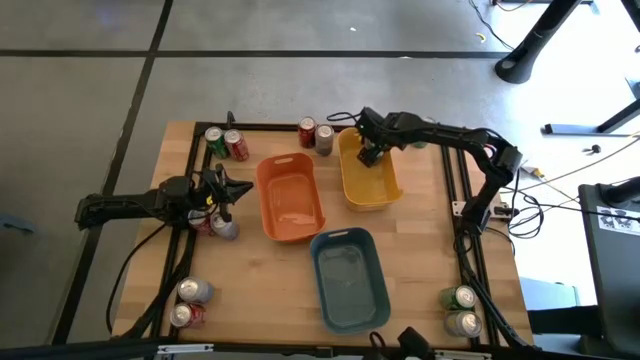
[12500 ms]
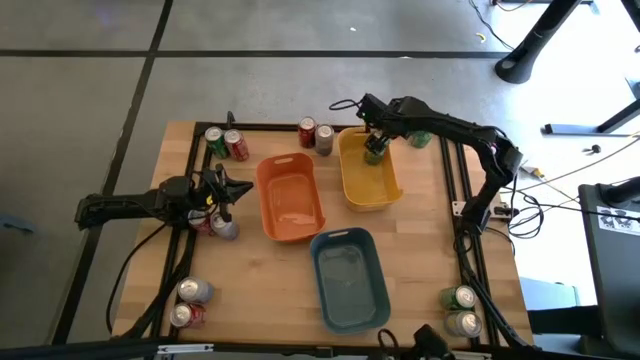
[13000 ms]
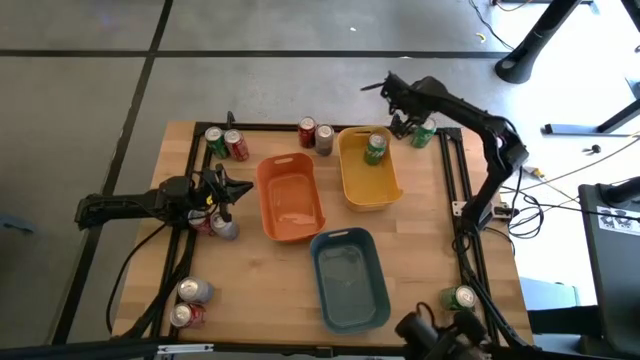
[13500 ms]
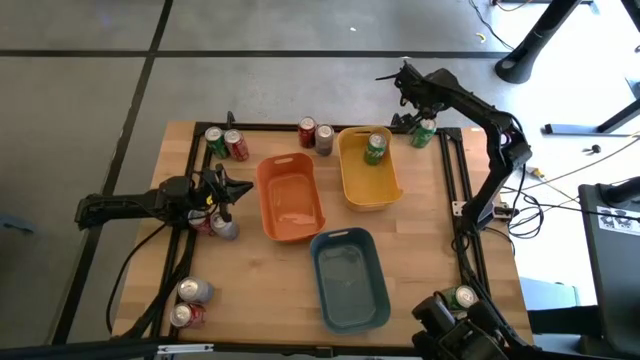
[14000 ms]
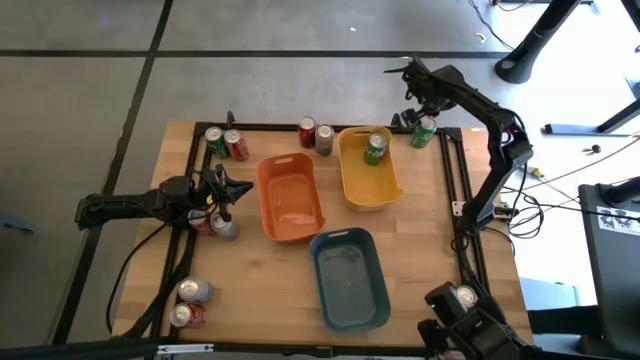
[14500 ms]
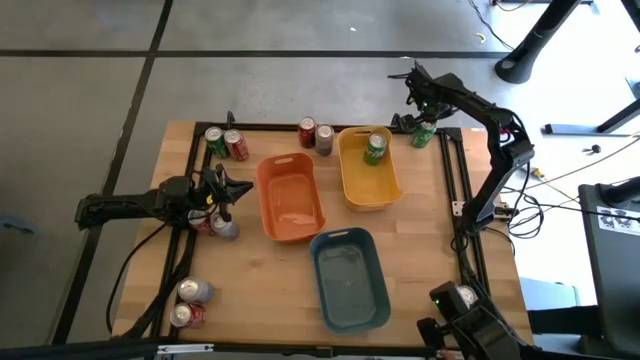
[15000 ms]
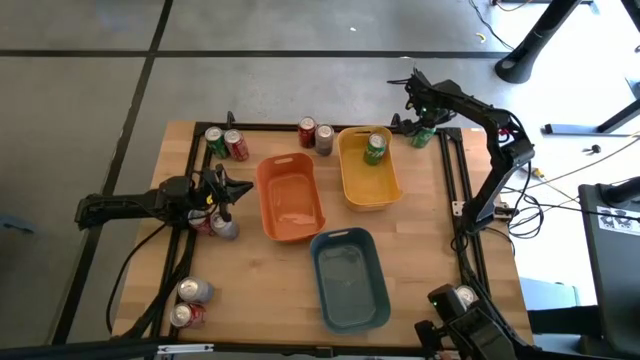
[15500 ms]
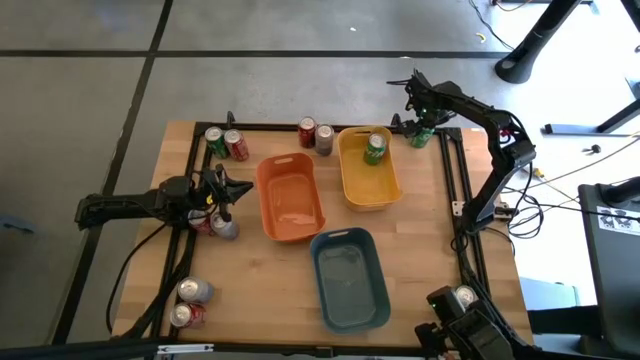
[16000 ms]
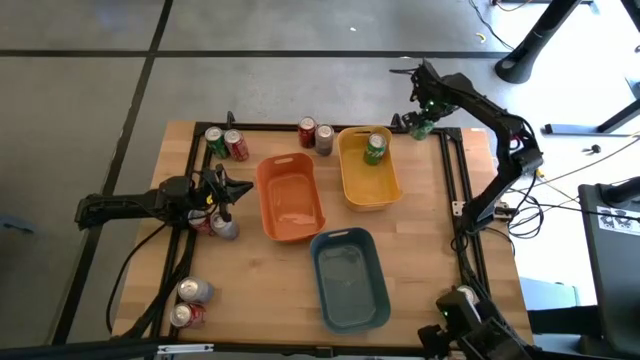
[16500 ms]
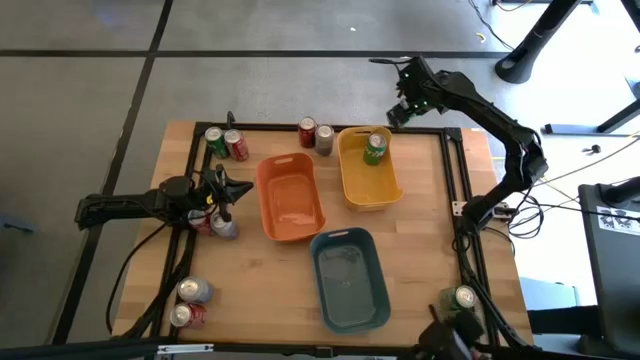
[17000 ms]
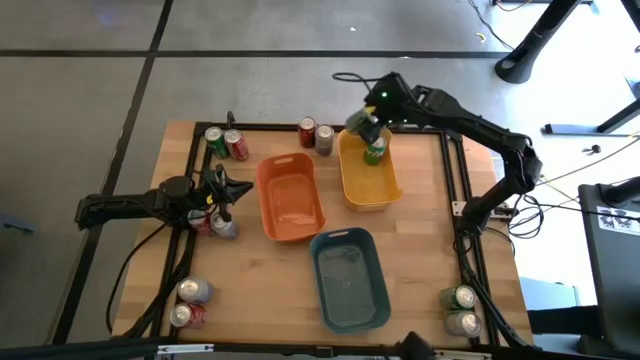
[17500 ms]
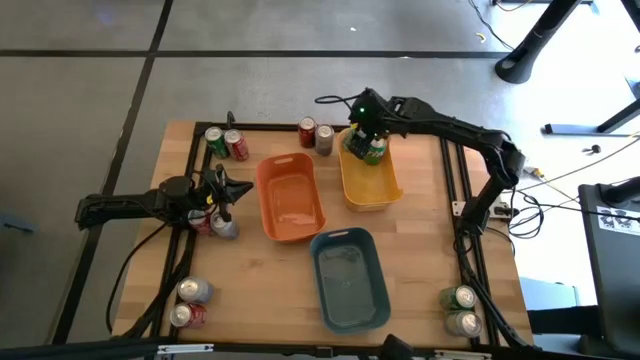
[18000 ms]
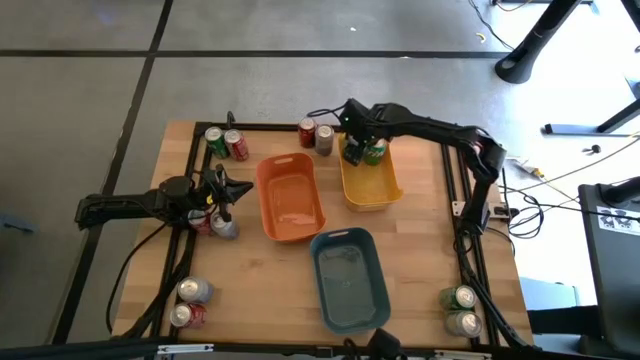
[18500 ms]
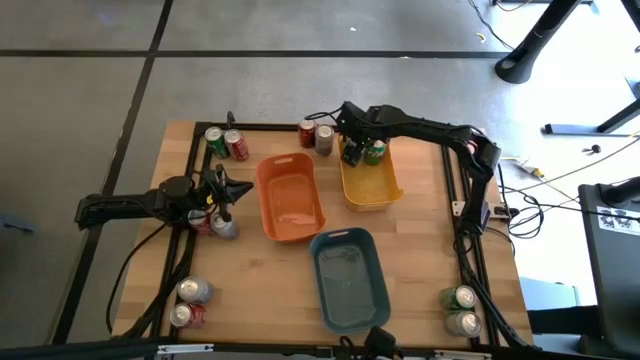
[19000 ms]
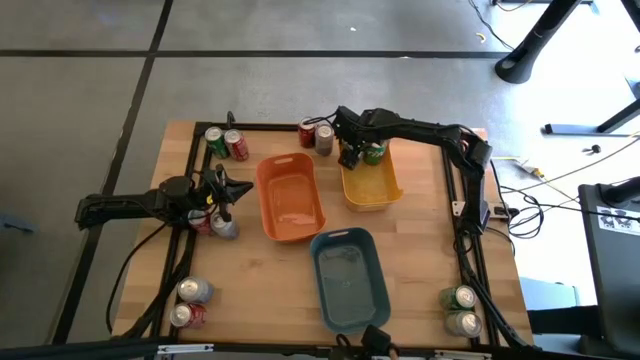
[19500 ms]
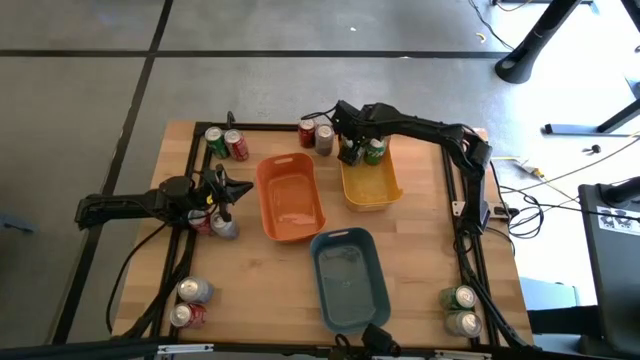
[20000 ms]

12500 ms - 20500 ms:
Task: Sort soda cans
Put the green soda can into the yellow bin

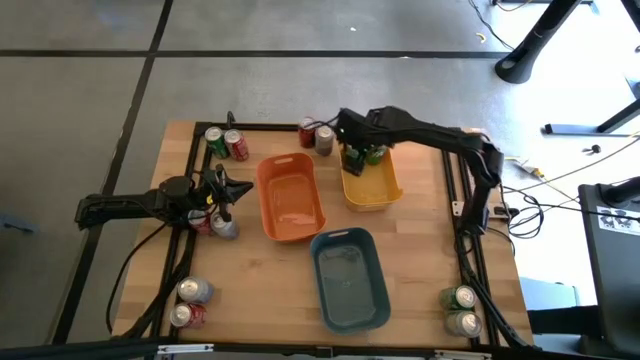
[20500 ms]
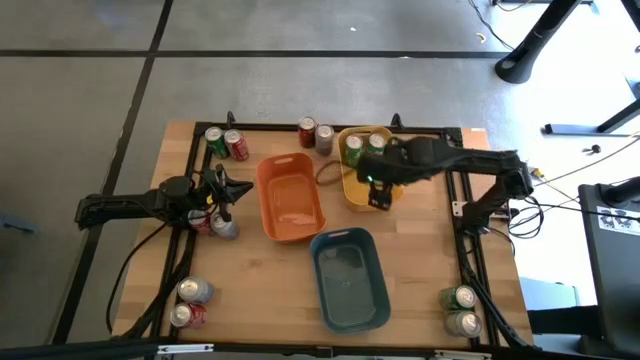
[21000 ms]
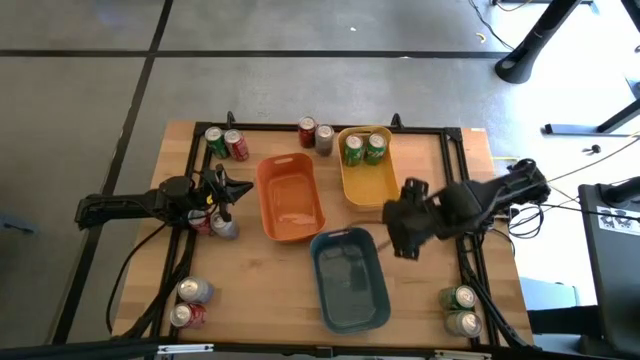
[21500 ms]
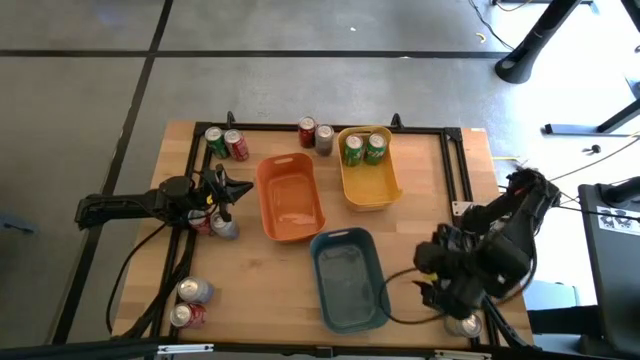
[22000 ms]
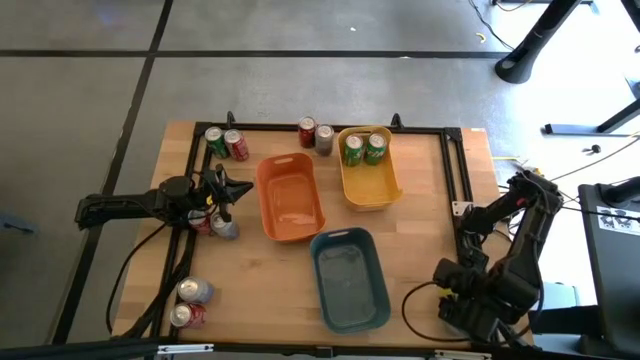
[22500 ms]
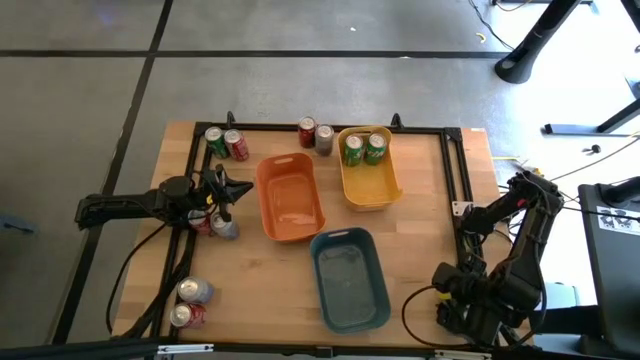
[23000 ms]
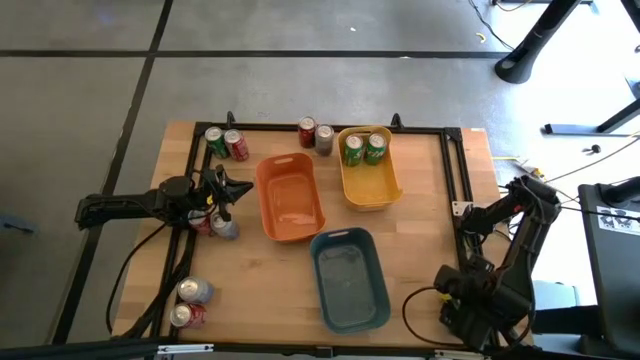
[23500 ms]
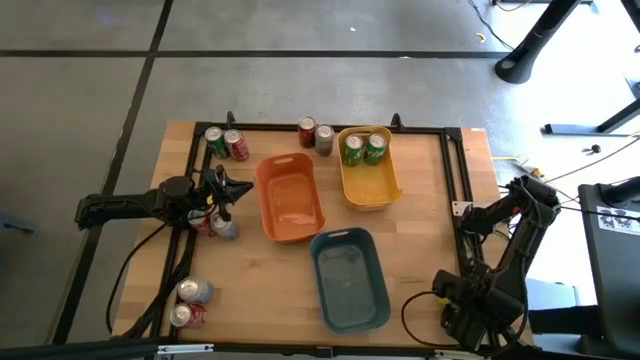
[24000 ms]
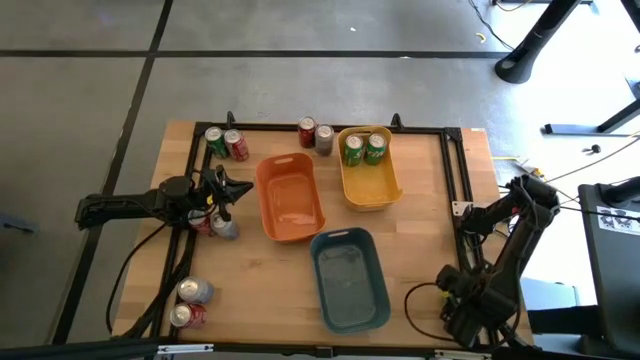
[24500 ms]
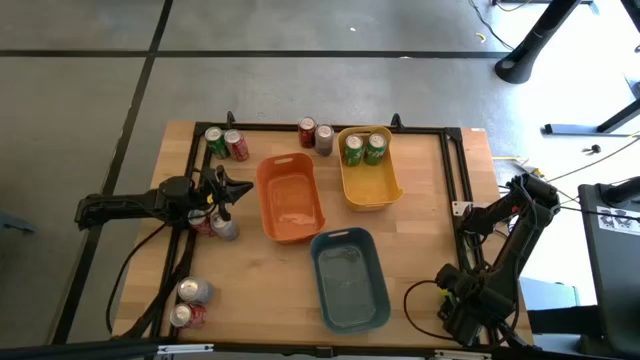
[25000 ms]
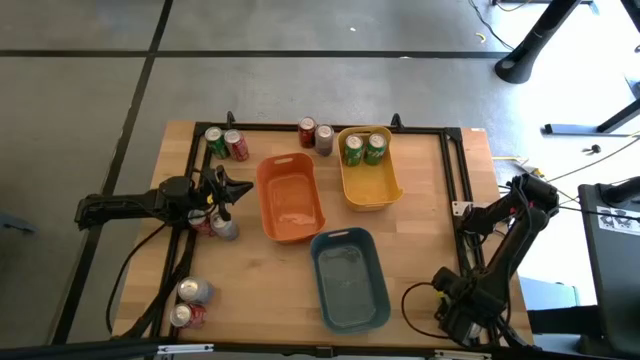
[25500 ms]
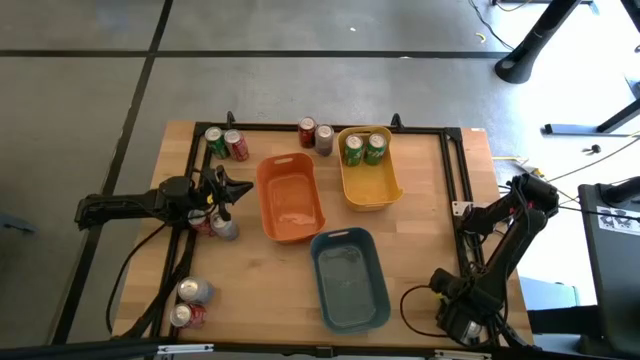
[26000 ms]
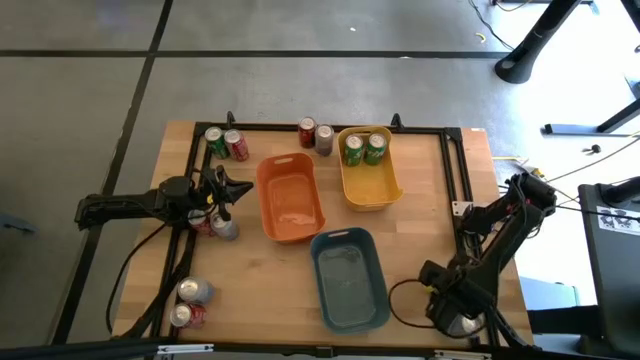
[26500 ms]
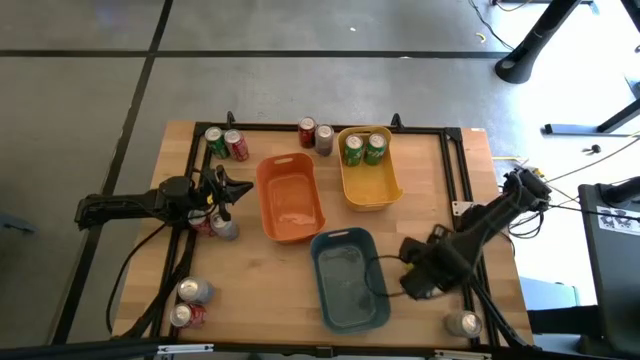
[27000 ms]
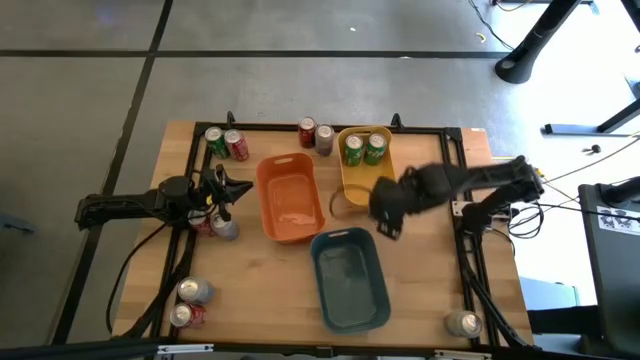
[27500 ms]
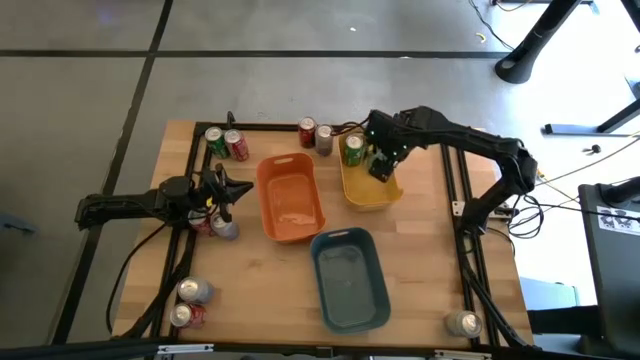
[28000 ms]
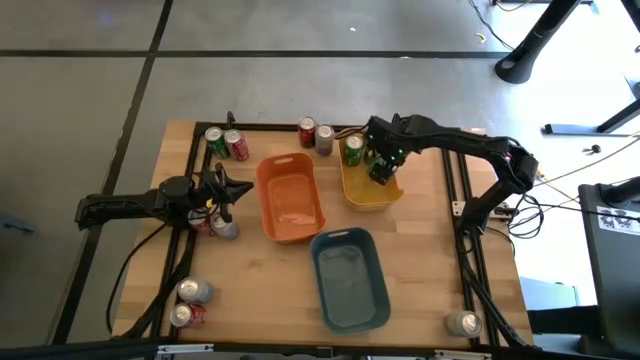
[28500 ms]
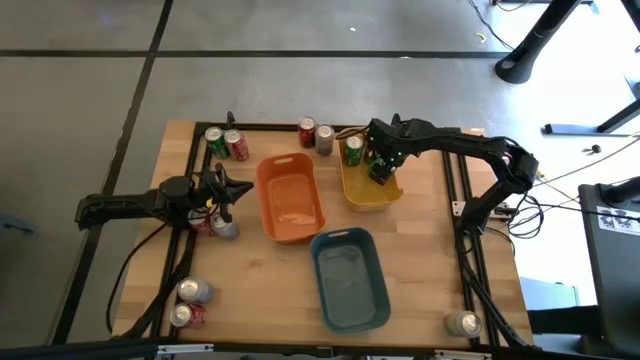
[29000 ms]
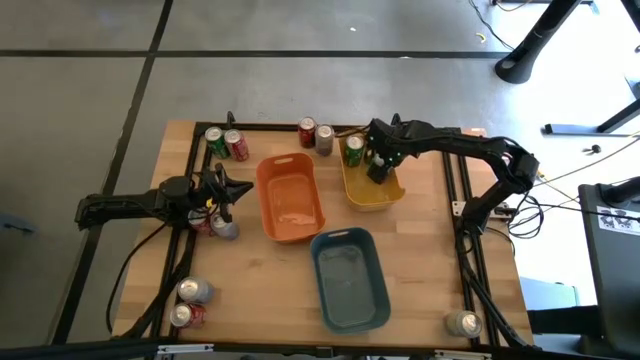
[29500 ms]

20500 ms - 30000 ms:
Put the green soda can into the yellow bin

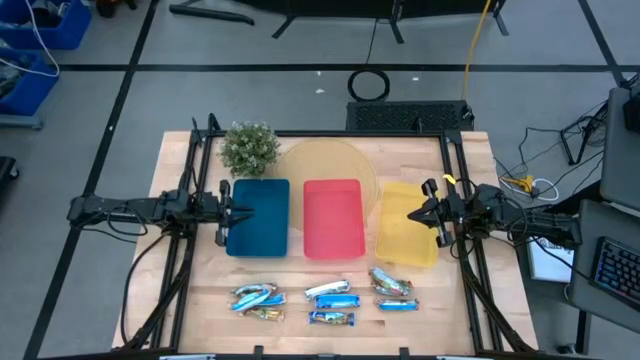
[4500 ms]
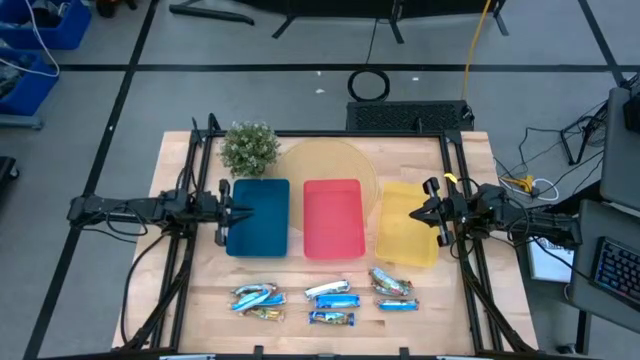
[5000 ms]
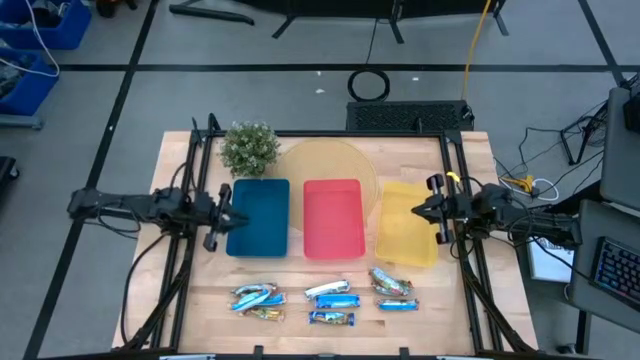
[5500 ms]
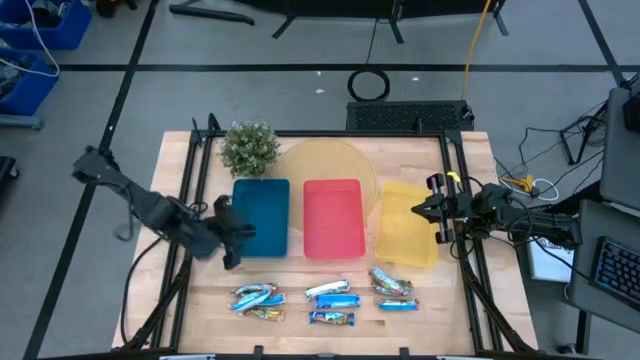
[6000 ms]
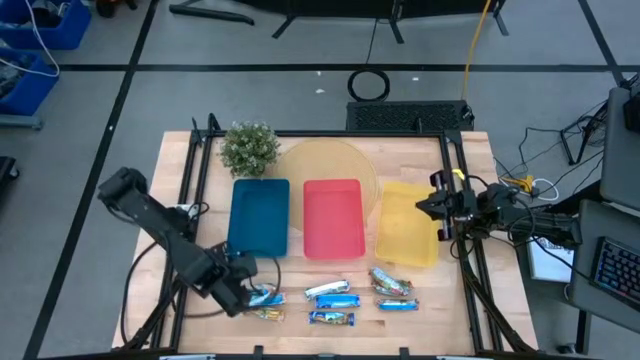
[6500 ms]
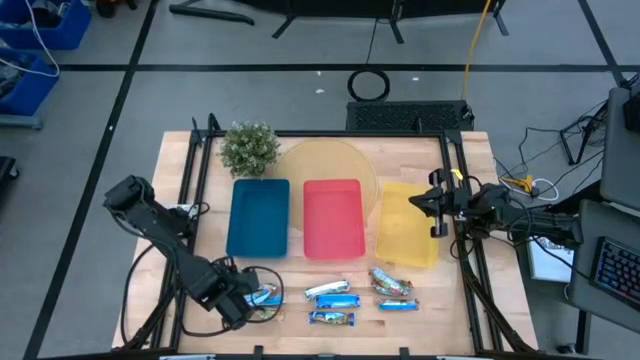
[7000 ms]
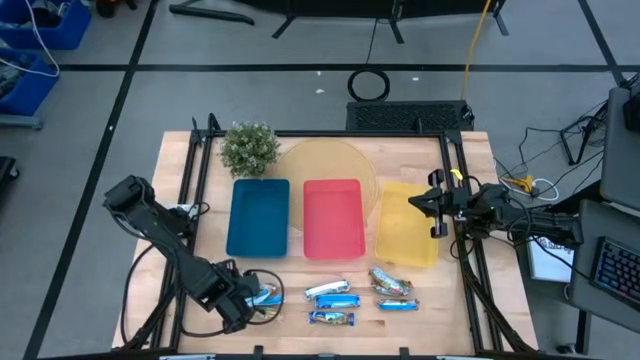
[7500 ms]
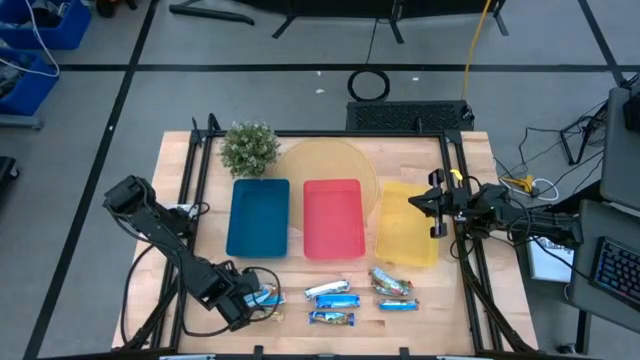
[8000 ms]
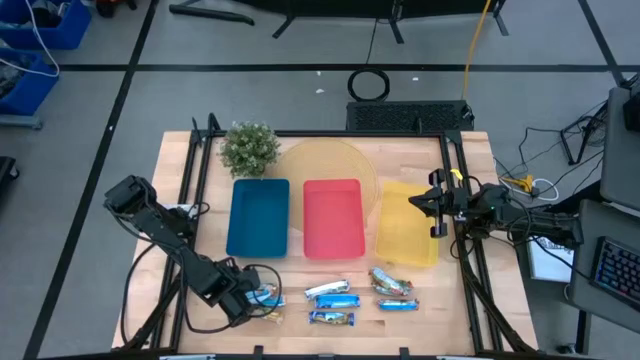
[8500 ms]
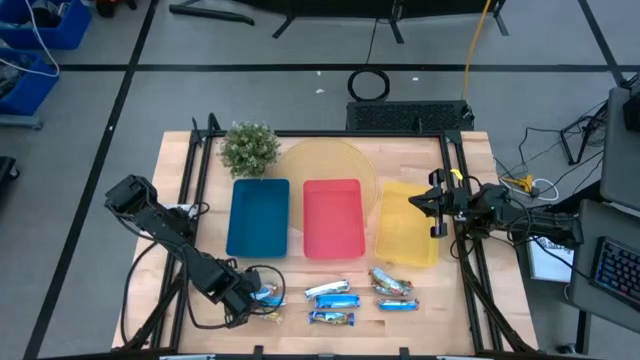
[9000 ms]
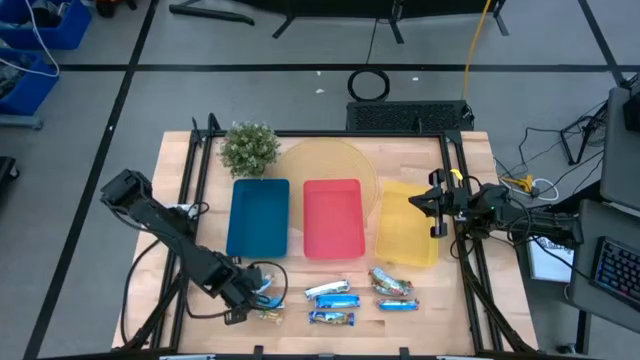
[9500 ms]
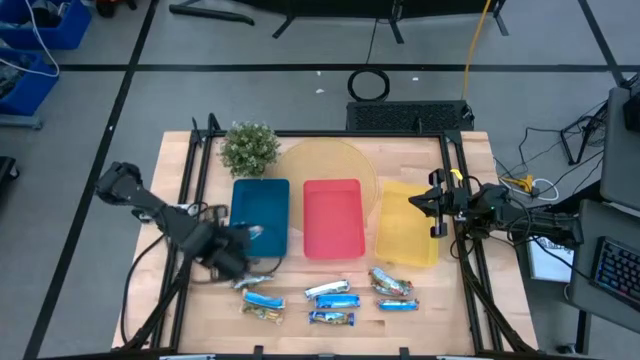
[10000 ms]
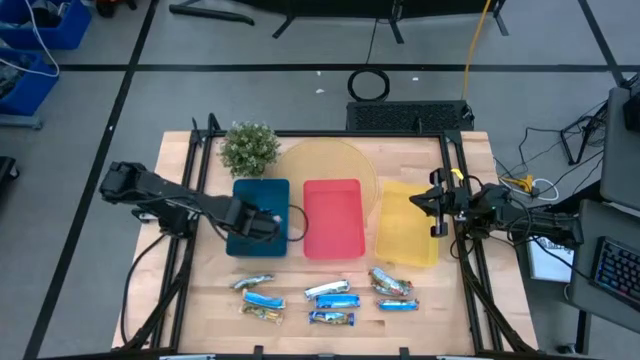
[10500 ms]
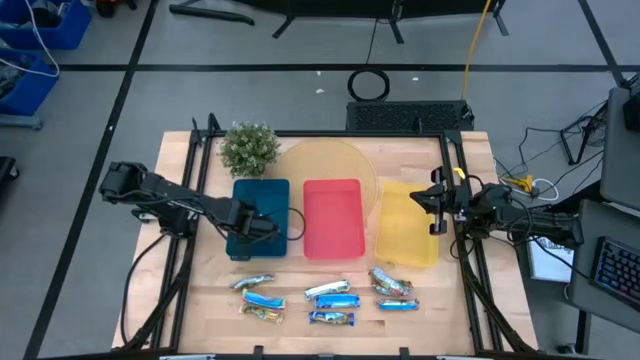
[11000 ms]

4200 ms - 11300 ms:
Task: Pick and place Granola Bars by type
Put the yellow granola bar into the blue bin
